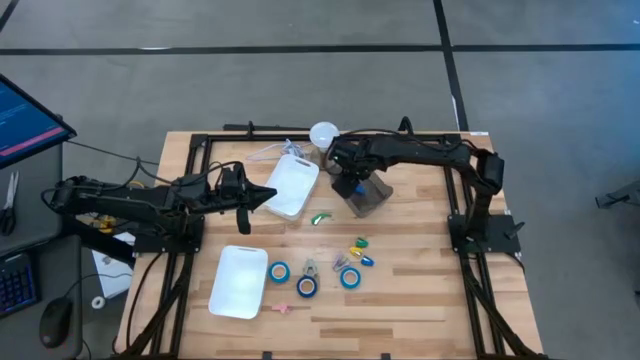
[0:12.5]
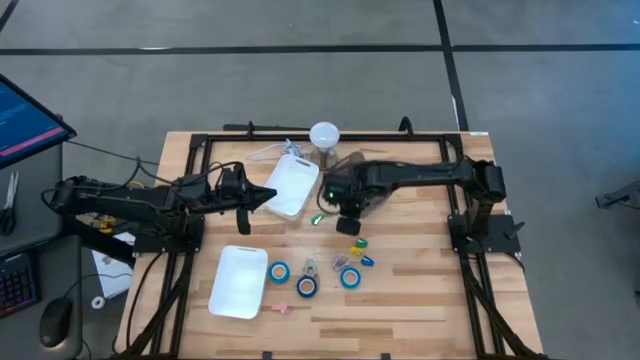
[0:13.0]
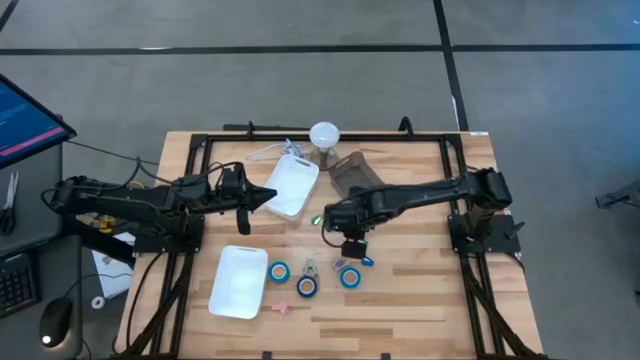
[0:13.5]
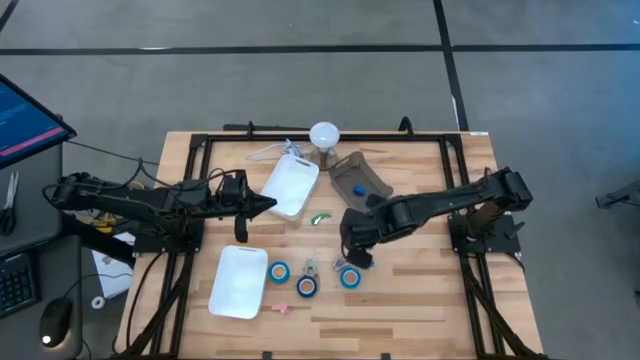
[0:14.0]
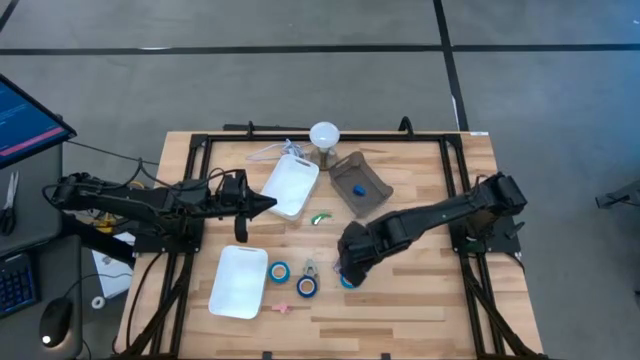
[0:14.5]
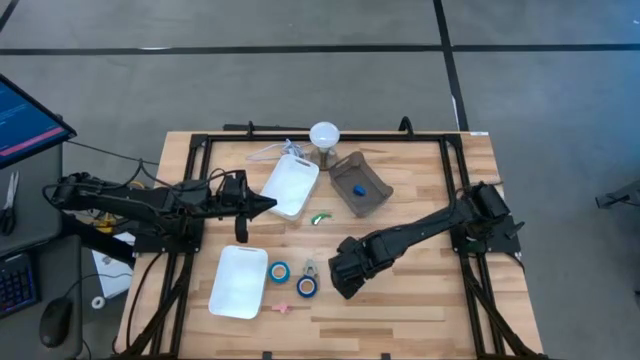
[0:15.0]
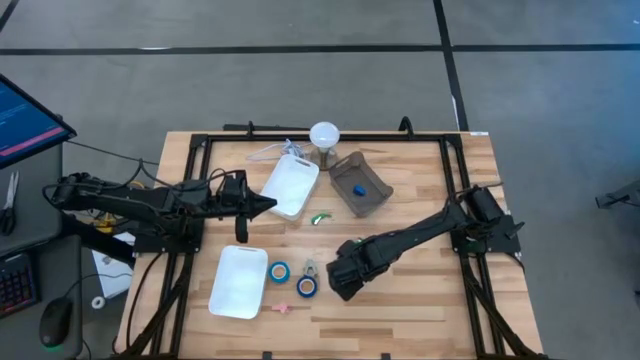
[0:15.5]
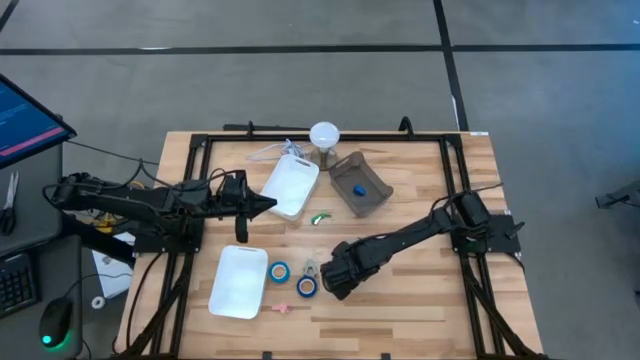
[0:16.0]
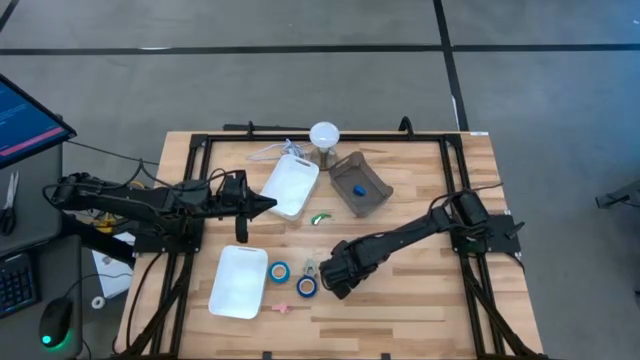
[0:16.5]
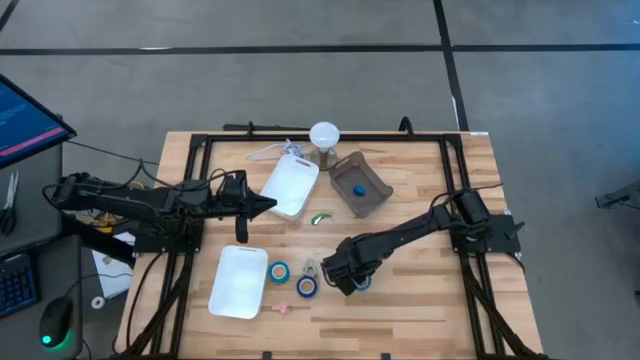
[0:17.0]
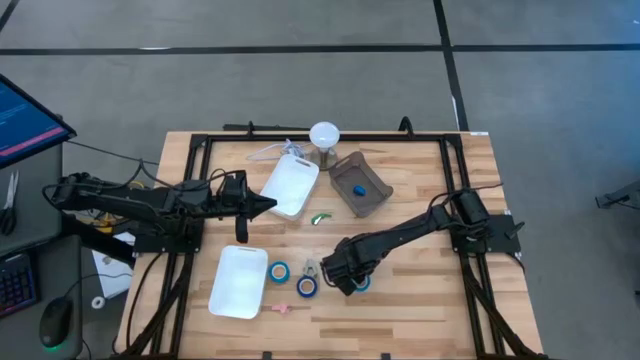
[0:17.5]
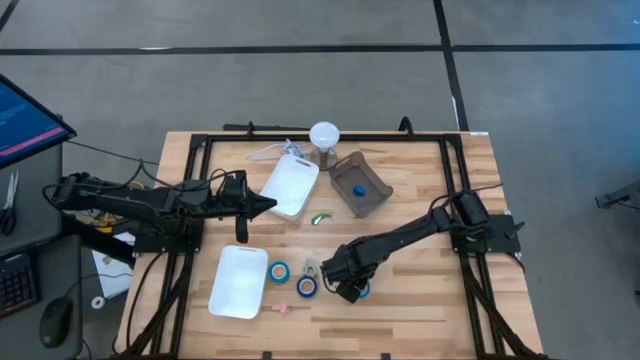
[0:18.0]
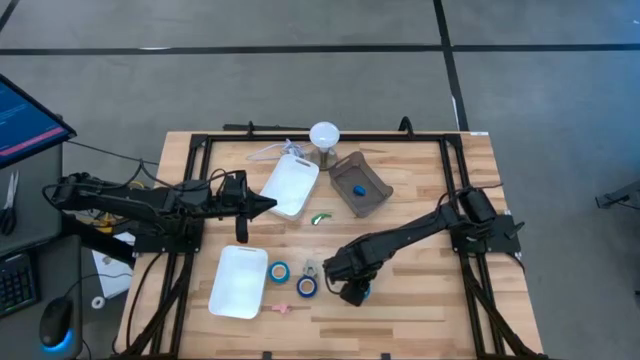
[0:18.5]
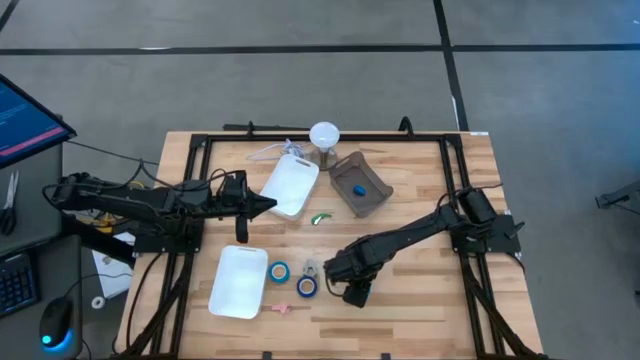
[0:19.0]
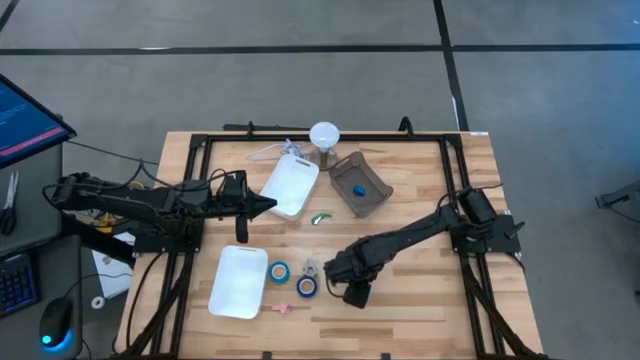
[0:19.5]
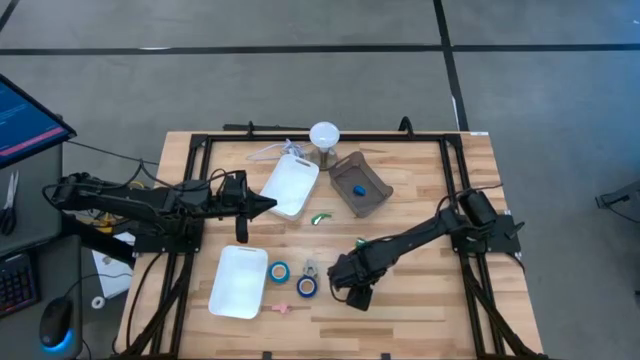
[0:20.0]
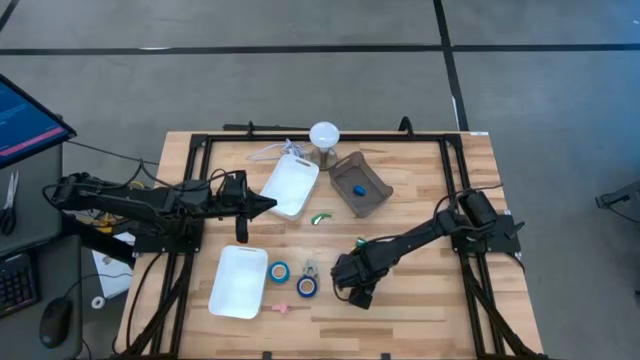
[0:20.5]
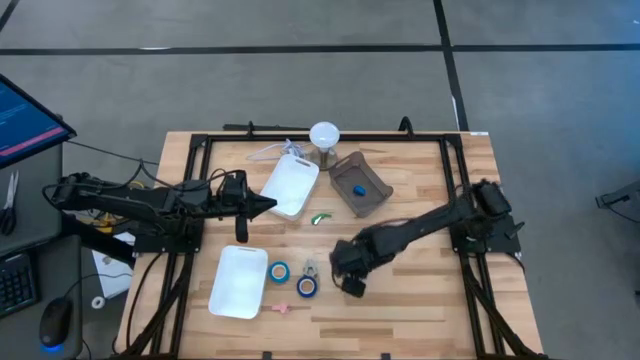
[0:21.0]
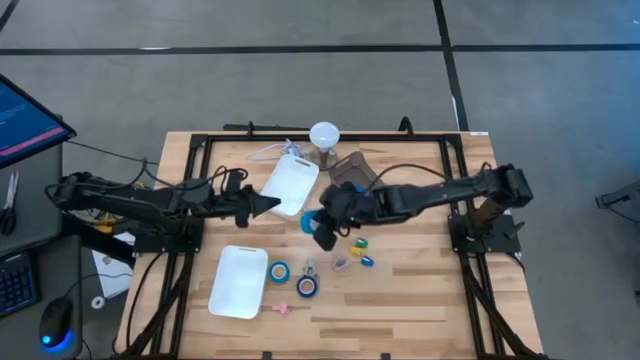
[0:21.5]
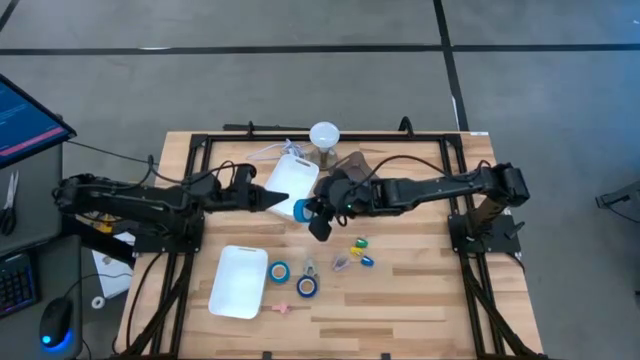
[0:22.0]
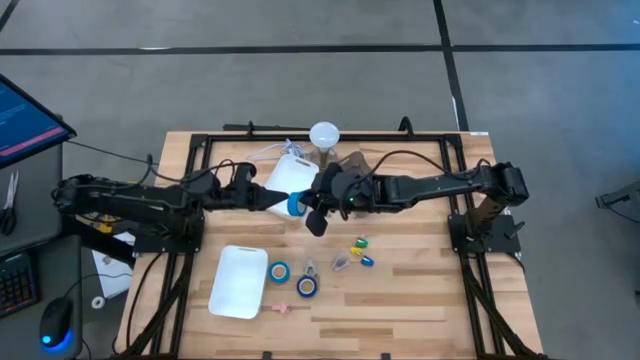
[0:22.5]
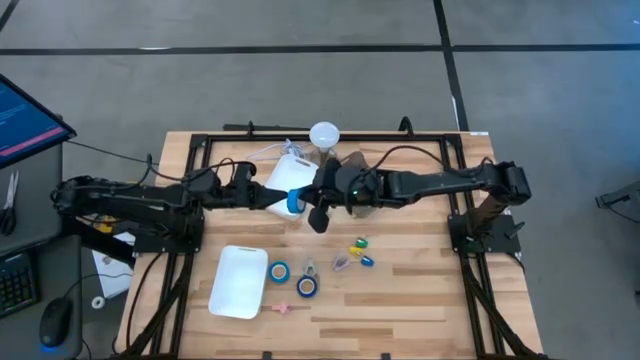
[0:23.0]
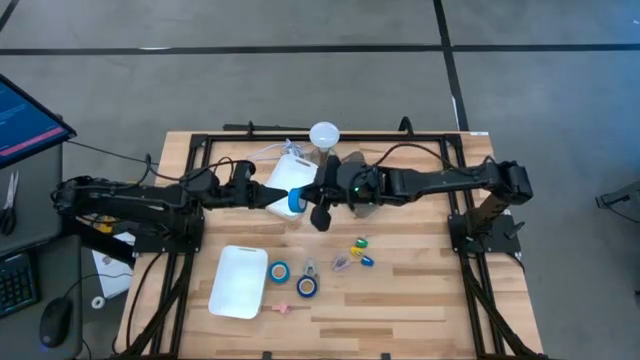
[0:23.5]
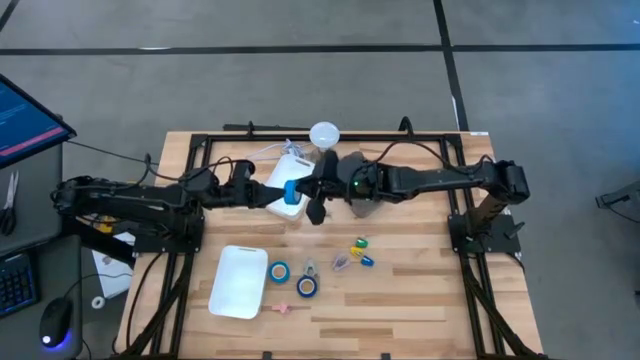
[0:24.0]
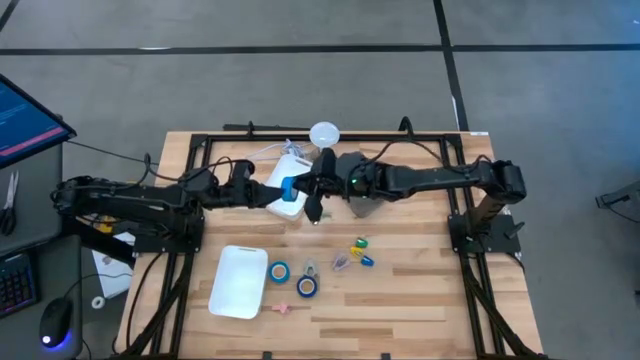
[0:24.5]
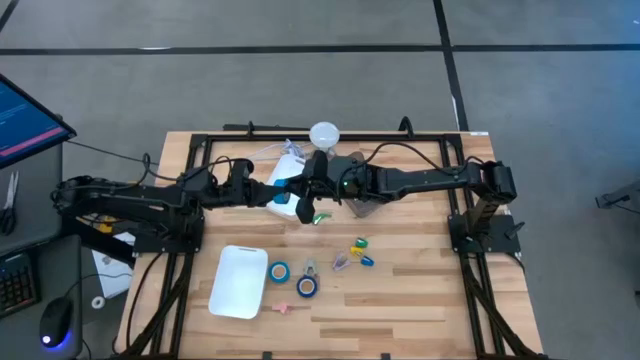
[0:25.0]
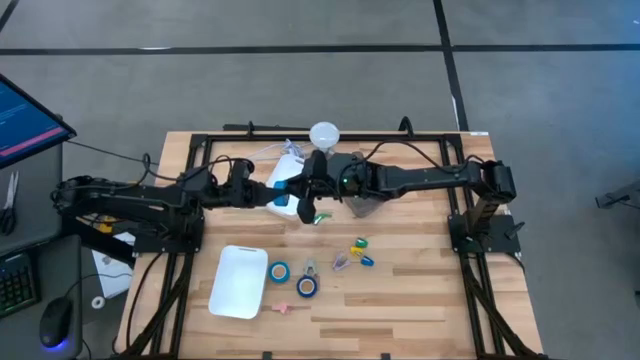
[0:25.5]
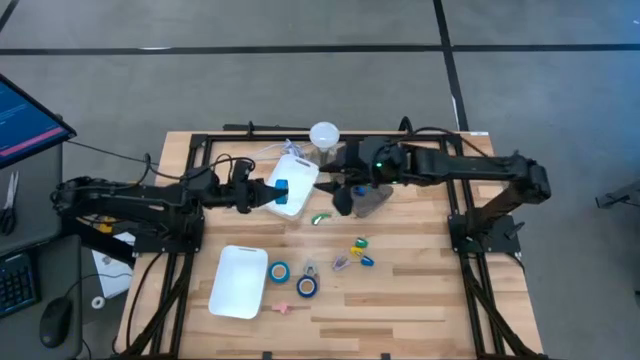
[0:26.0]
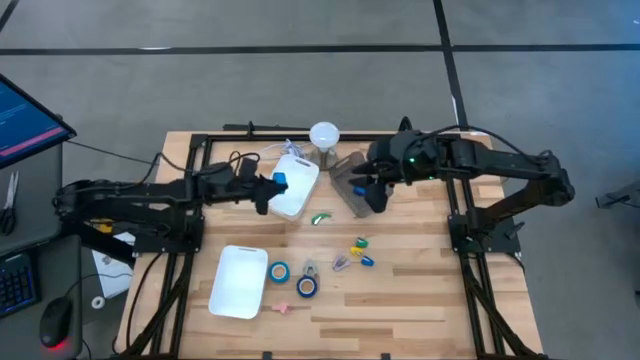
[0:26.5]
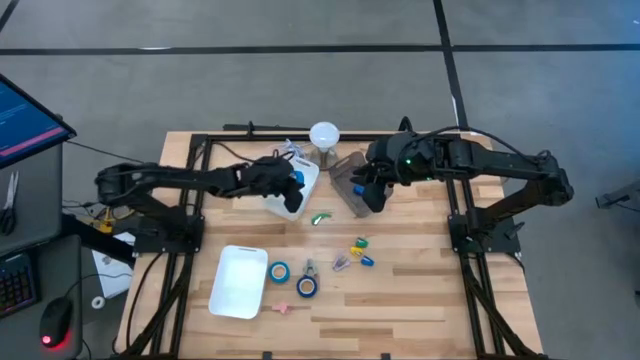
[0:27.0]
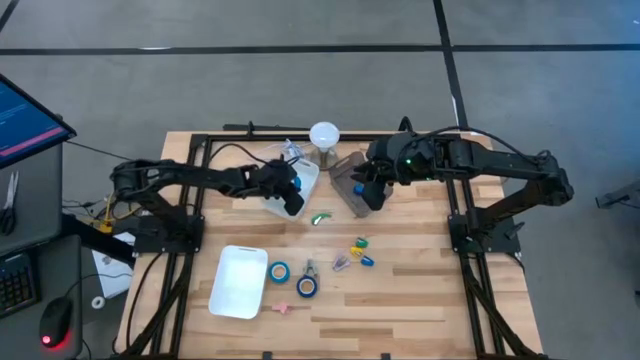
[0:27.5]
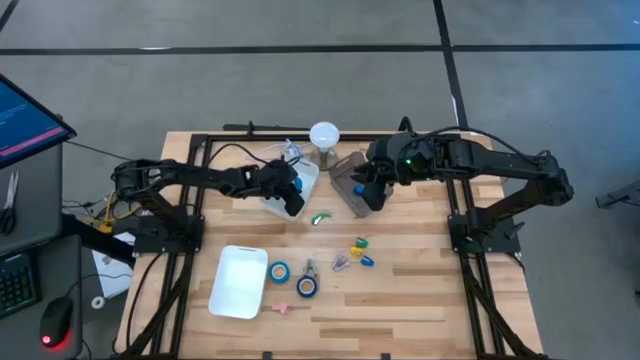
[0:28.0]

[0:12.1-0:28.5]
Task: Pick and place Stapler, Stapler remover, tape
Put the right blue tape into the top white bin

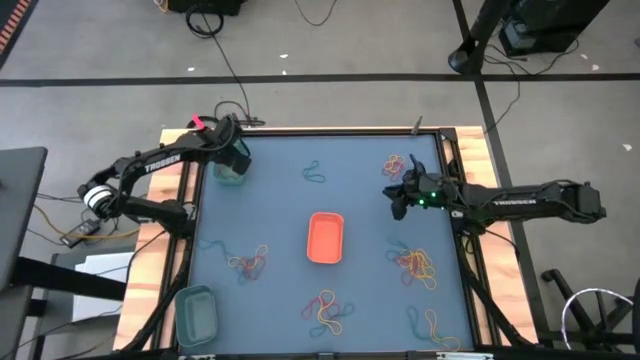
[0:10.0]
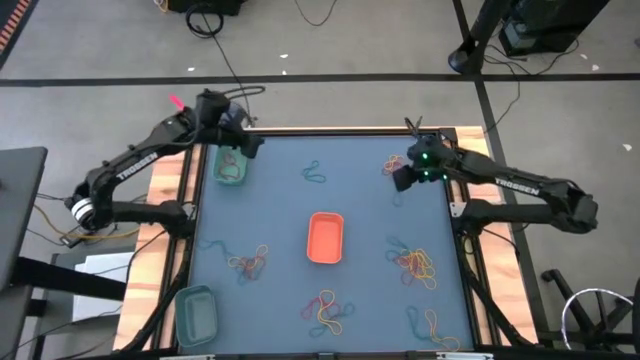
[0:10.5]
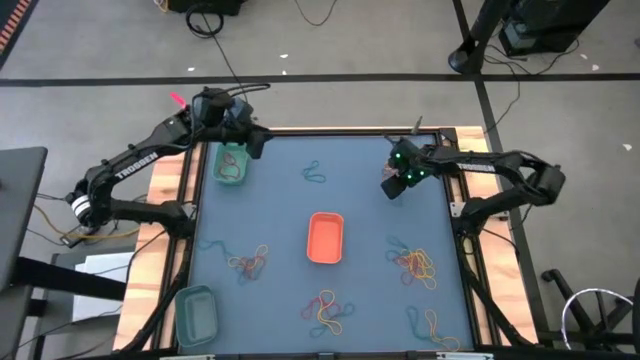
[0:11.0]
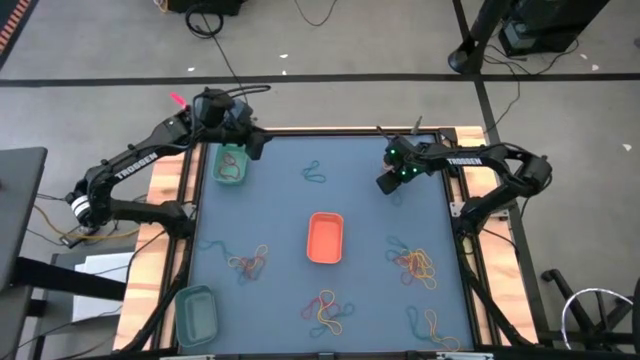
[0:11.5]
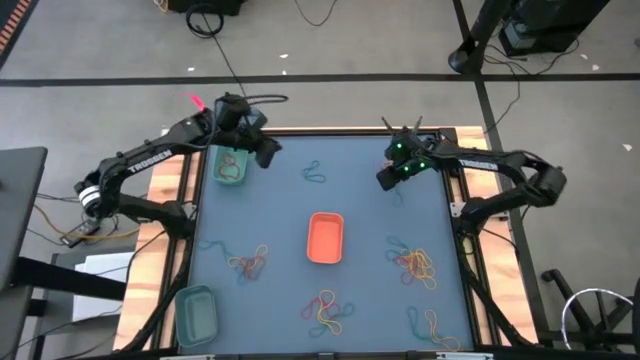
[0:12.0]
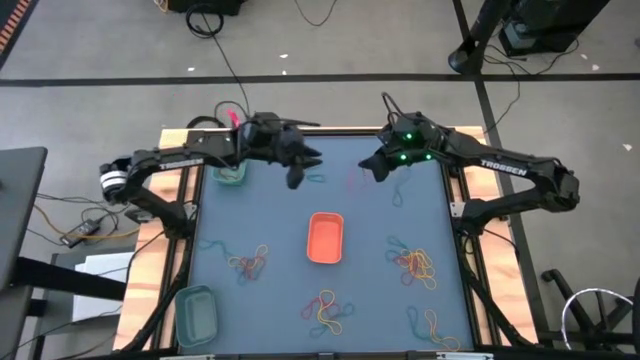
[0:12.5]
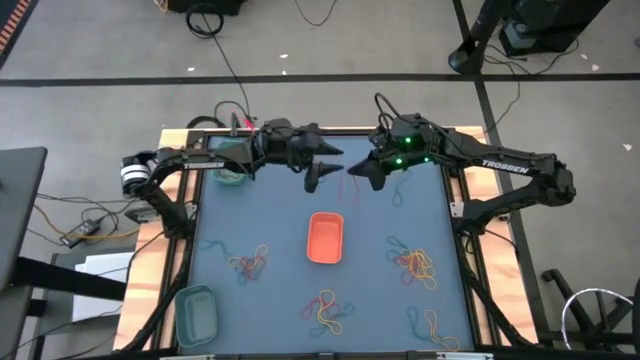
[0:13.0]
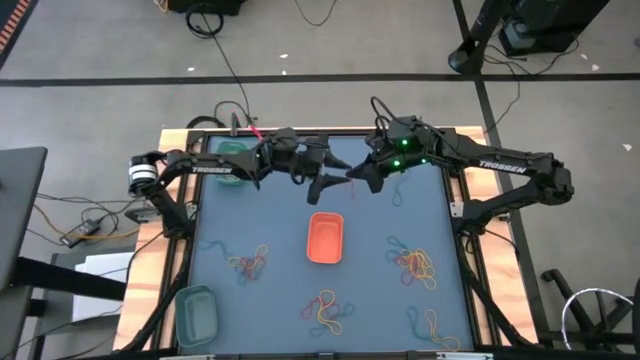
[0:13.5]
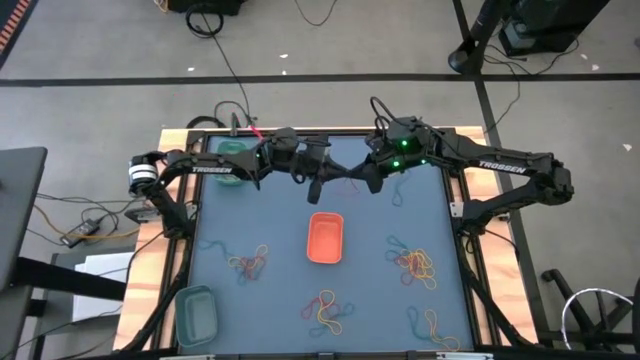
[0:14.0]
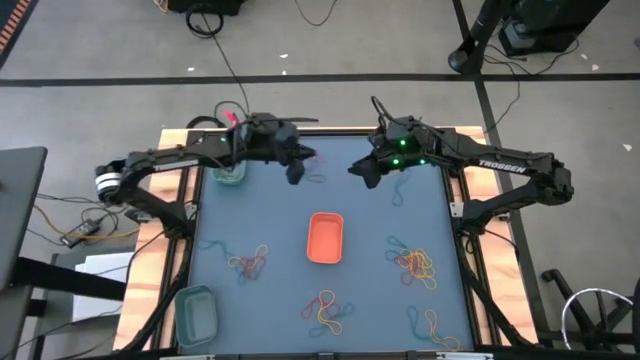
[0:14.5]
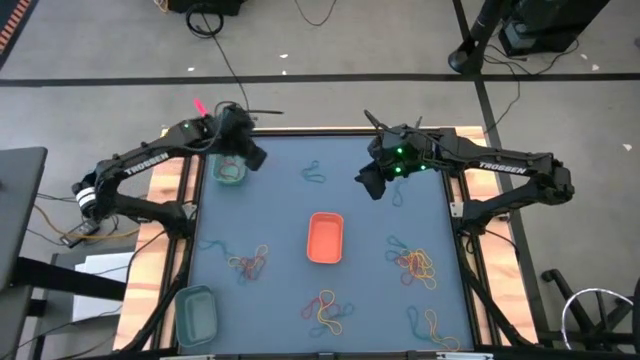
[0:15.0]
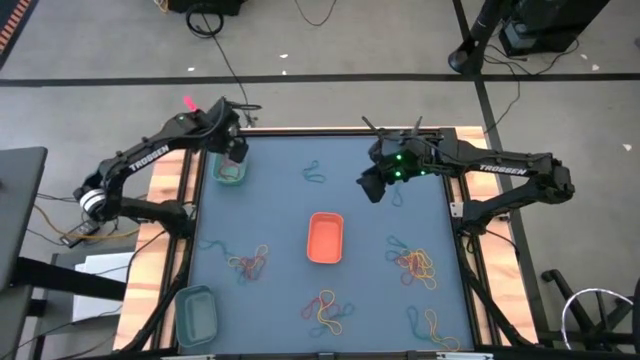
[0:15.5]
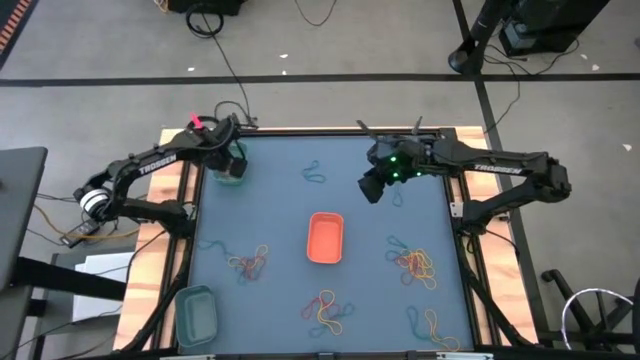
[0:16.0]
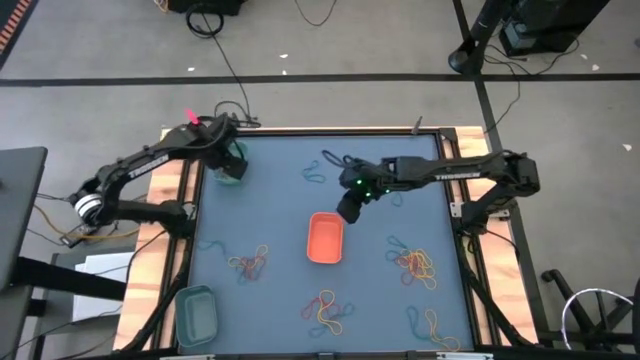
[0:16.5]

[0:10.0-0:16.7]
Task: Sort rubber bands into baskets
Put the red rubber band into the green bin
